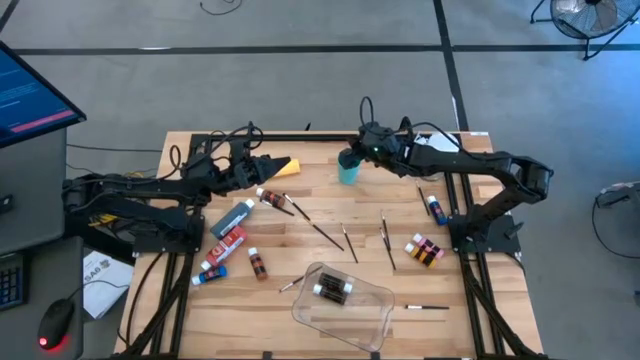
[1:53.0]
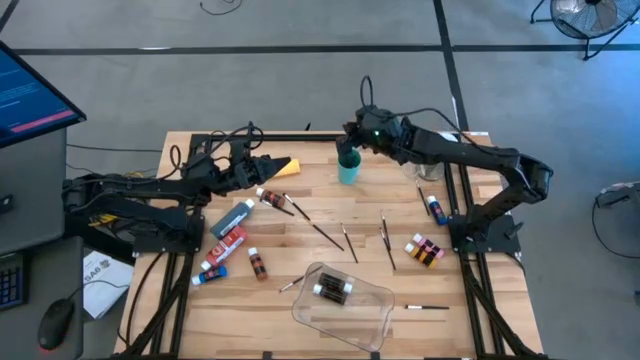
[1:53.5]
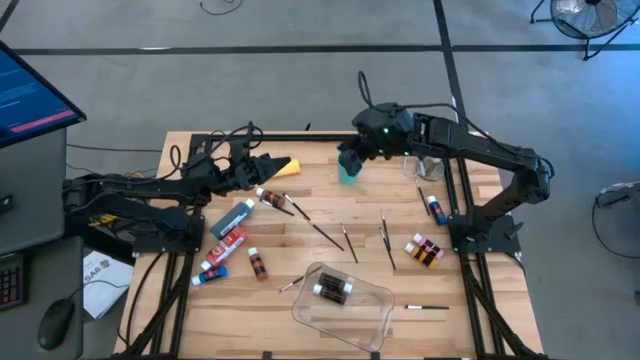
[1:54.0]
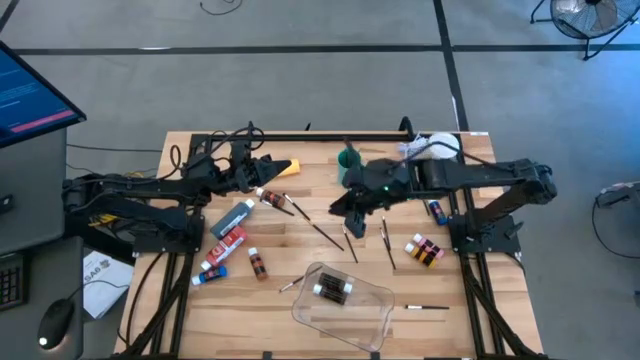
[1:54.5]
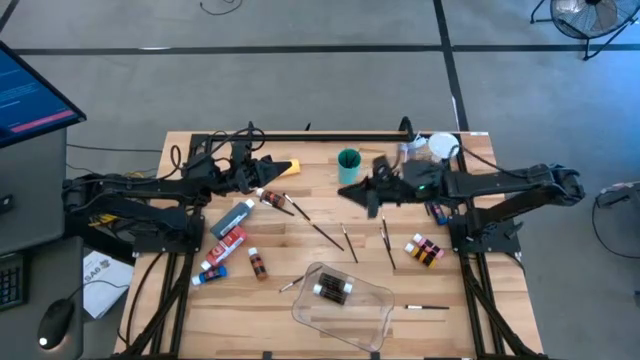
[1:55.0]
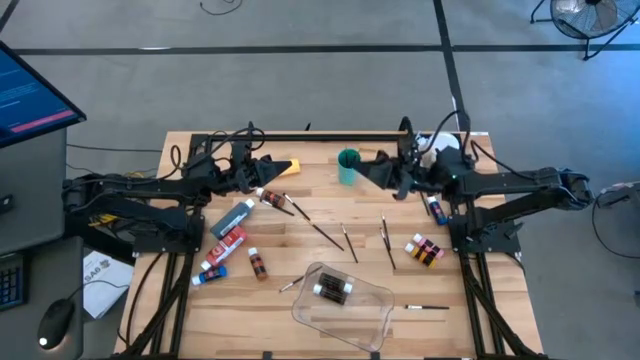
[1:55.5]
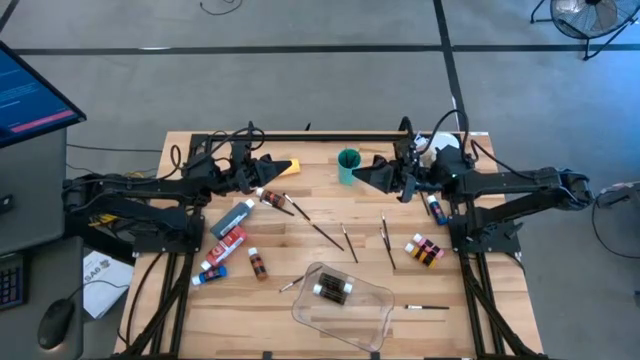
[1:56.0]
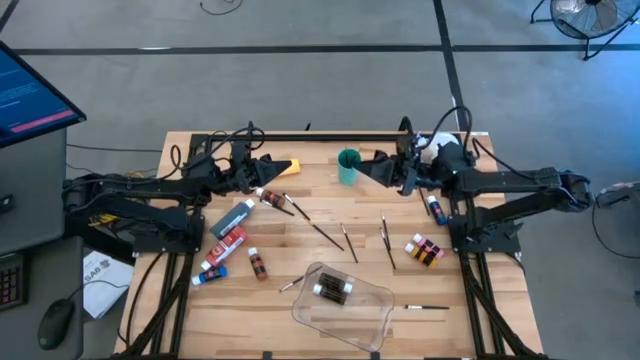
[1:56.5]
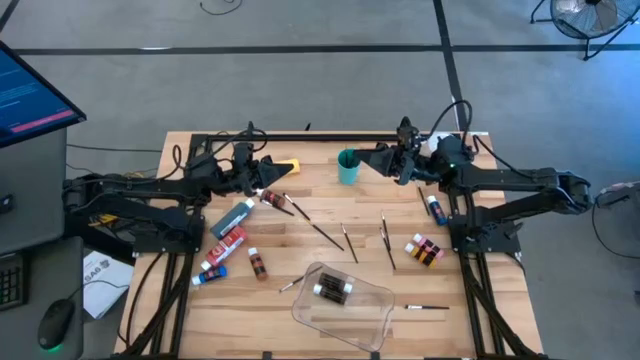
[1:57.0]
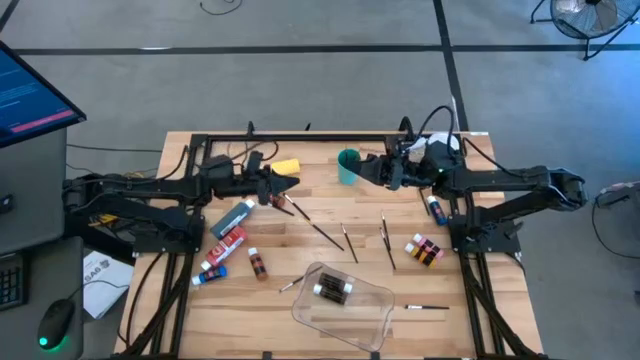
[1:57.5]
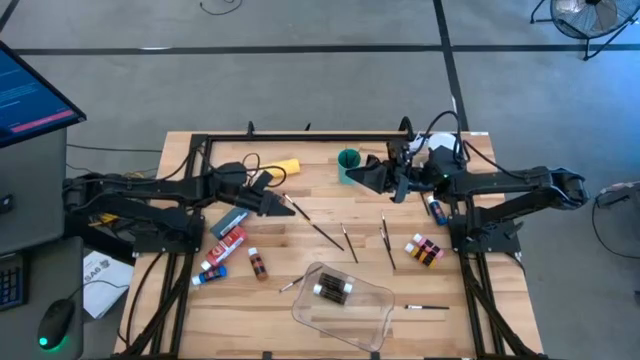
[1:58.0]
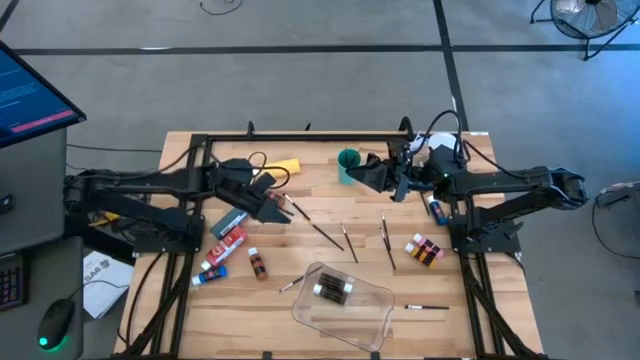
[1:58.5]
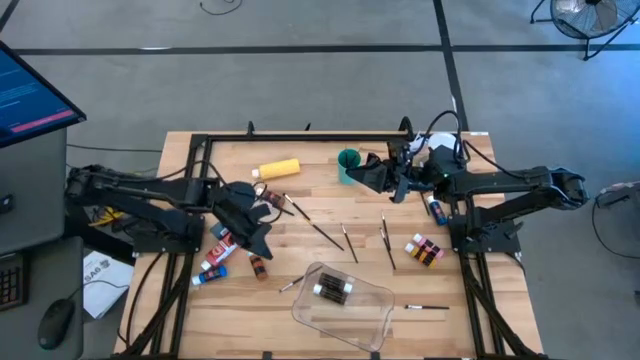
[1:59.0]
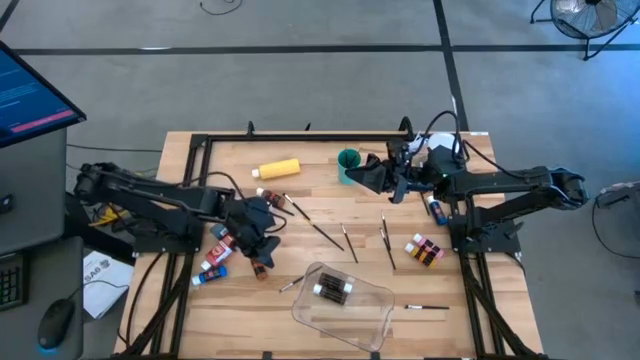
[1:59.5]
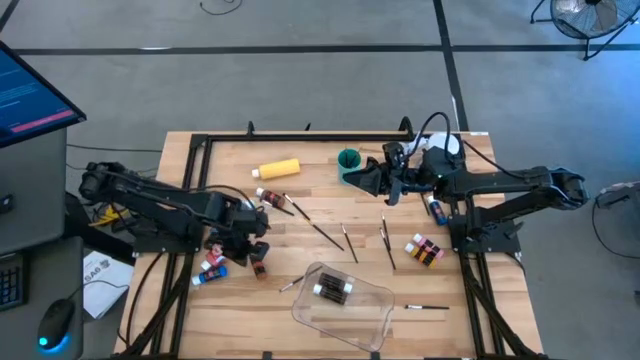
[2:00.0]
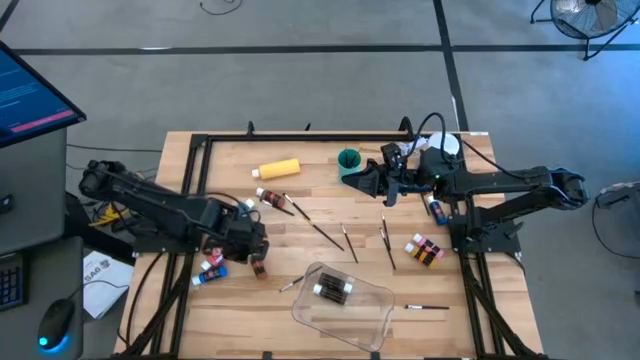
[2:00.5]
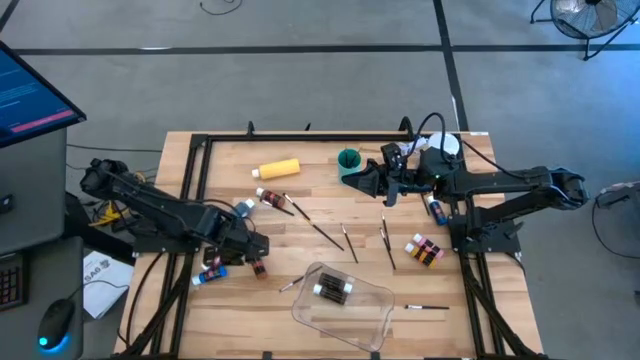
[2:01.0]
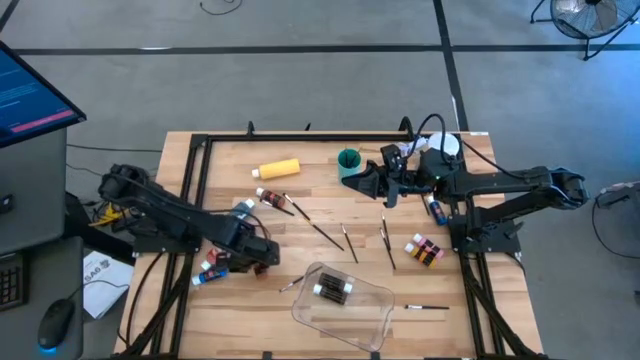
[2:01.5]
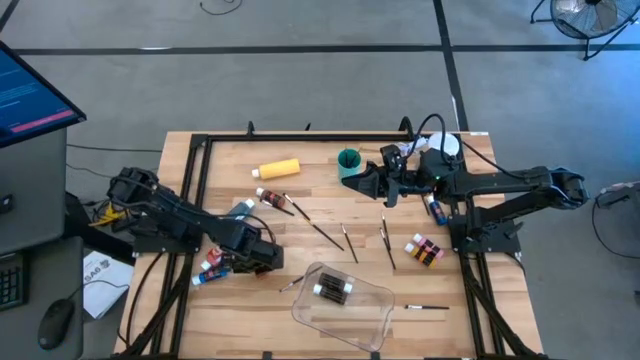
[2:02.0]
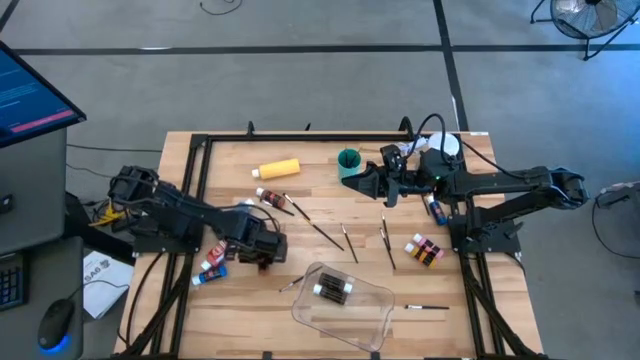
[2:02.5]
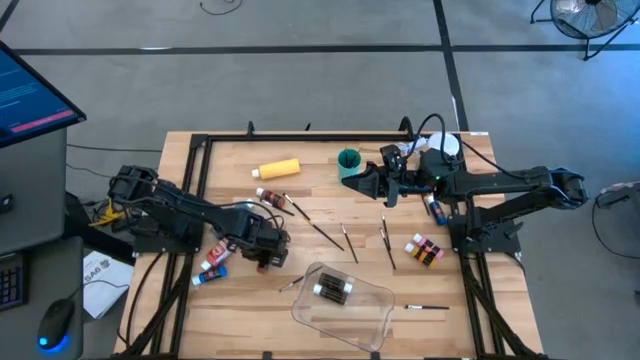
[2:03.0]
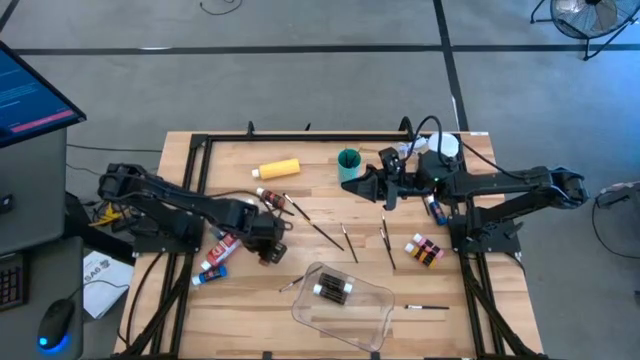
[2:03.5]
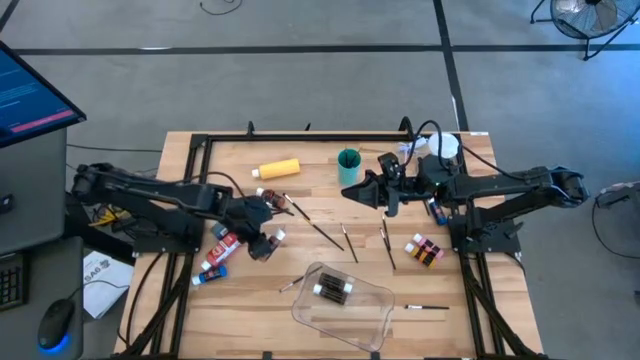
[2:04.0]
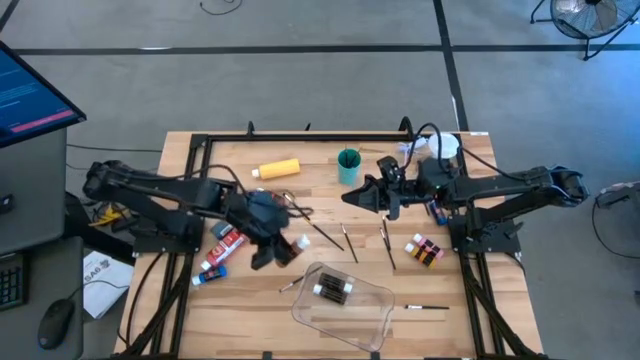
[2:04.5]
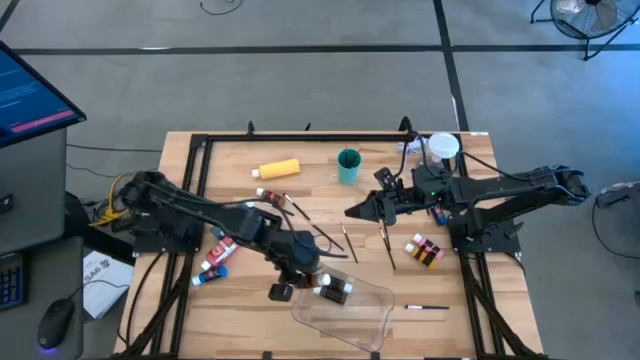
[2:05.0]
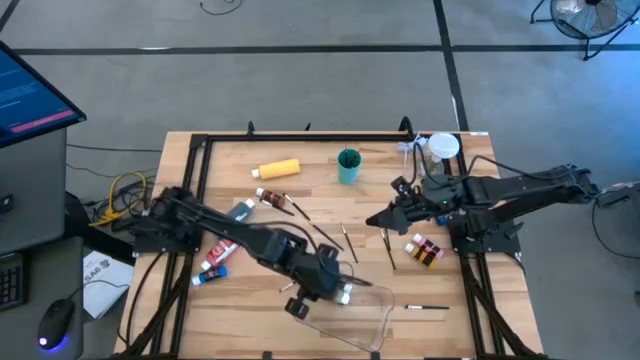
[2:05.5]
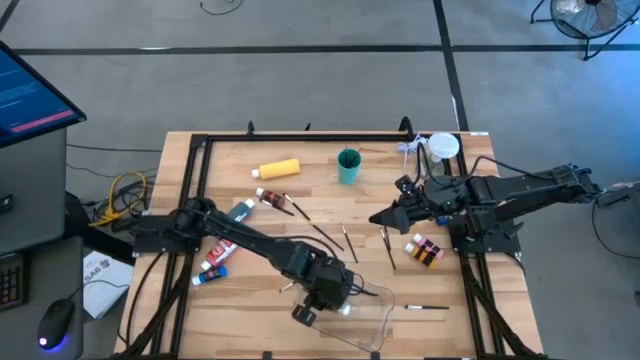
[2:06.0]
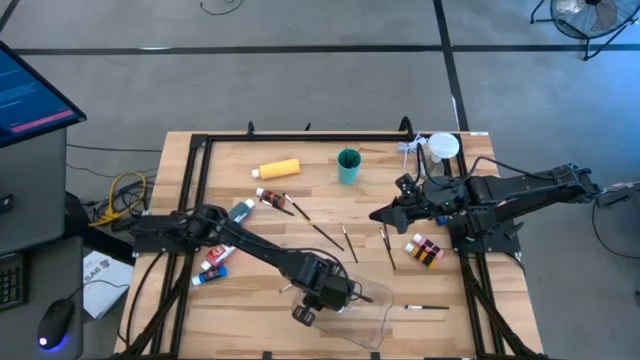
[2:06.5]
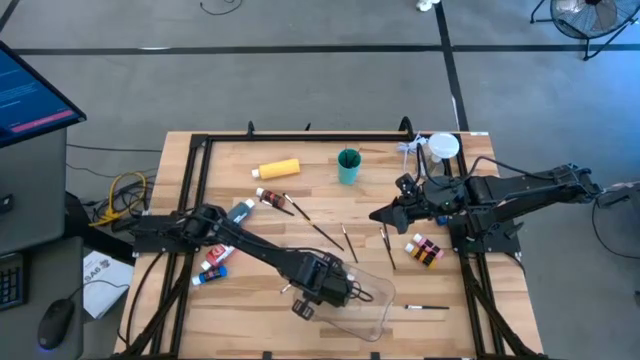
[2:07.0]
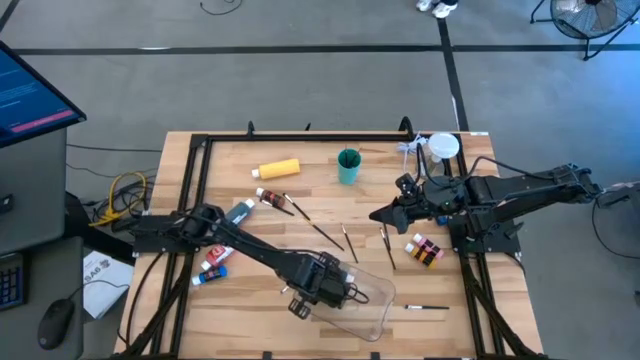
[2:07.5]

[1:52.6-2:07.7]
Task: Pick & Place Paint Supplies
Put the brown paint bottle into the transparent bin

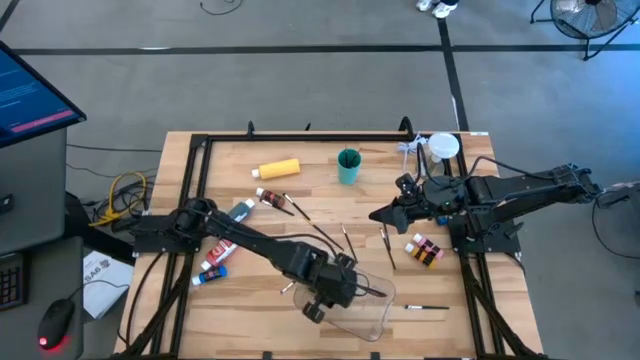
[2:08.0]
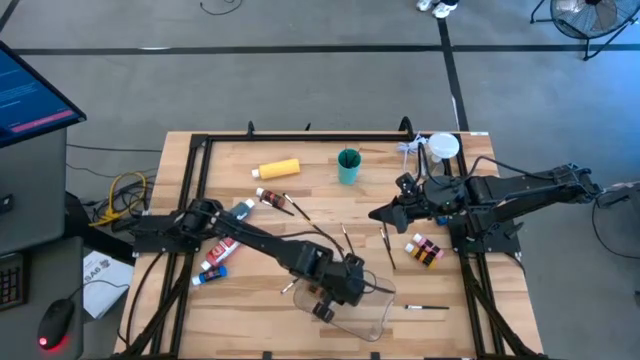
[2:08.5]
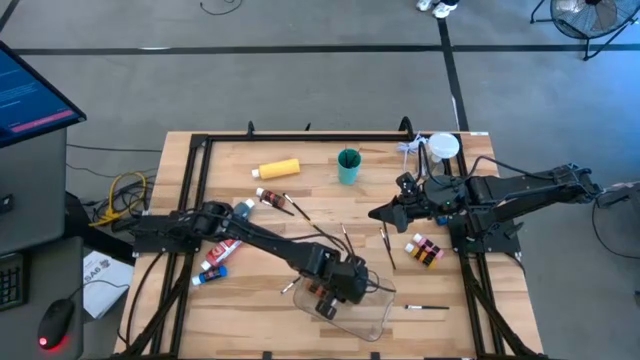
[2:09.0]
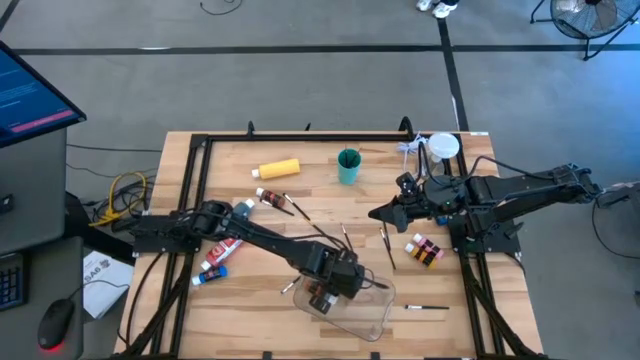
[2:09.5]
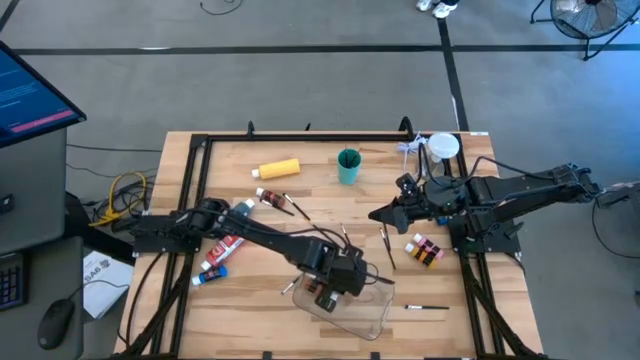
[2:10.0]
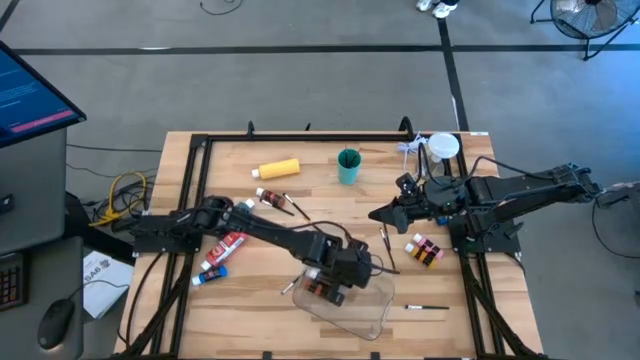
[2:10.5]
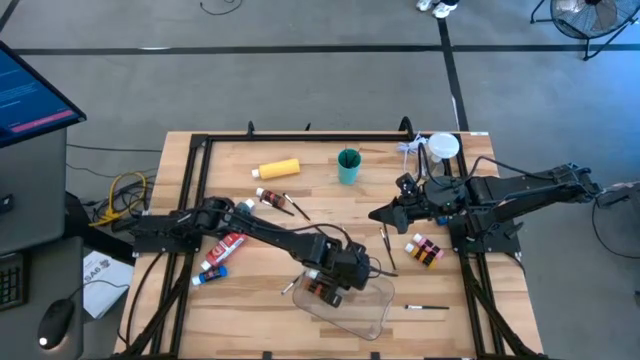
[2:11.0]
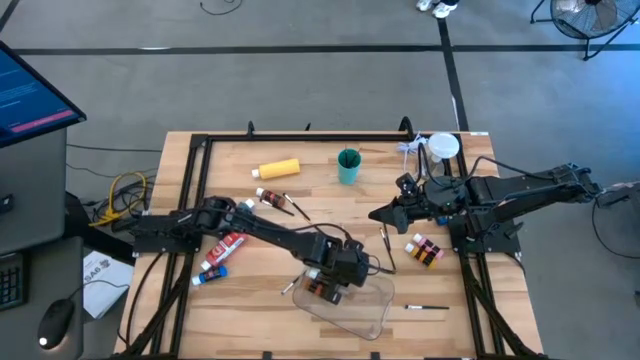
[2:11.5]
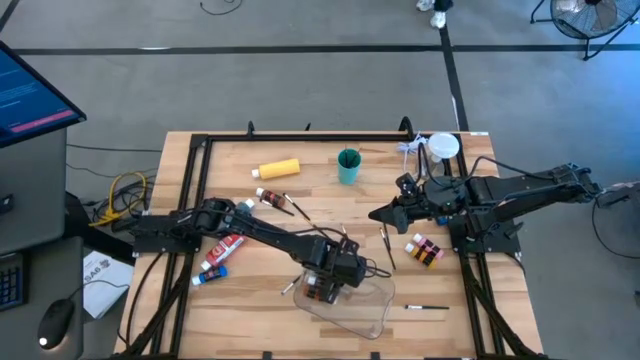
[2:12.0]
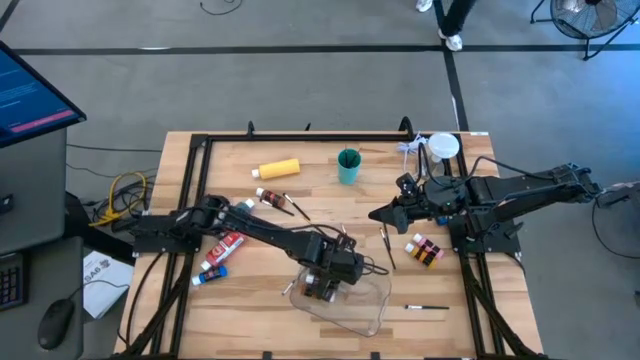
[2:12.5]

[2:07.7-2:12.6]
Adjust the paint bottles in the transparent bin

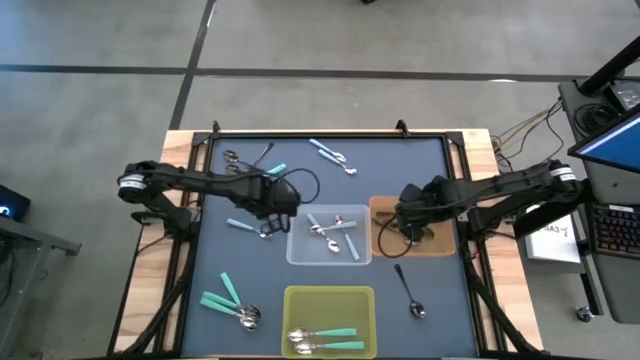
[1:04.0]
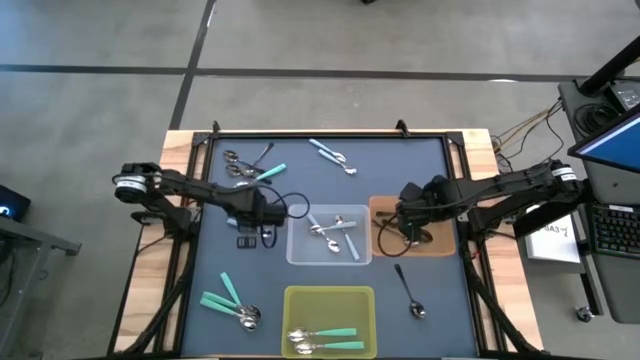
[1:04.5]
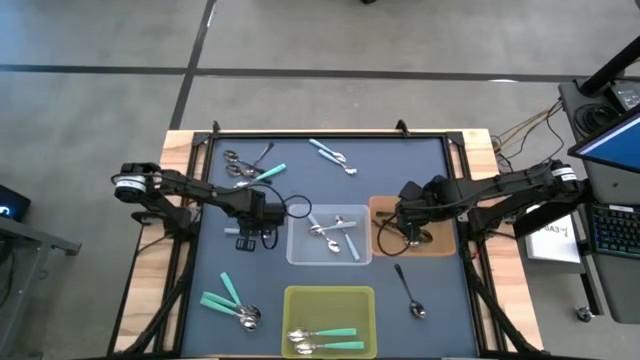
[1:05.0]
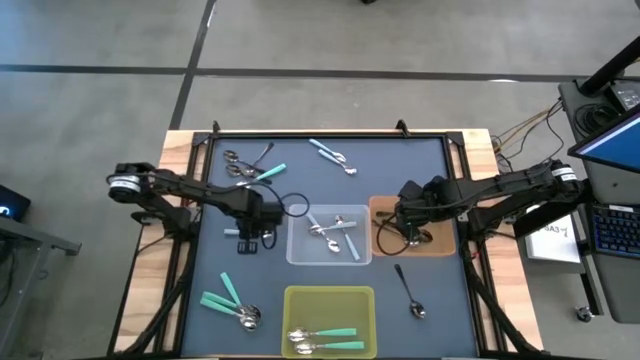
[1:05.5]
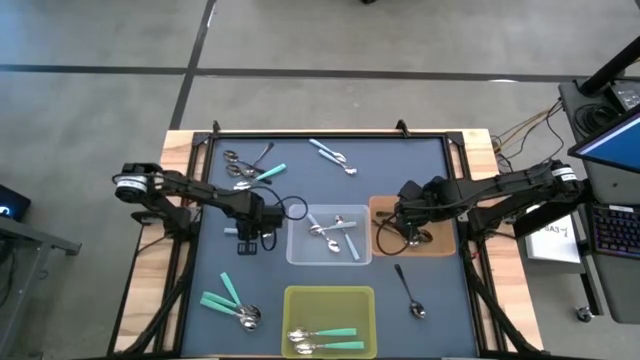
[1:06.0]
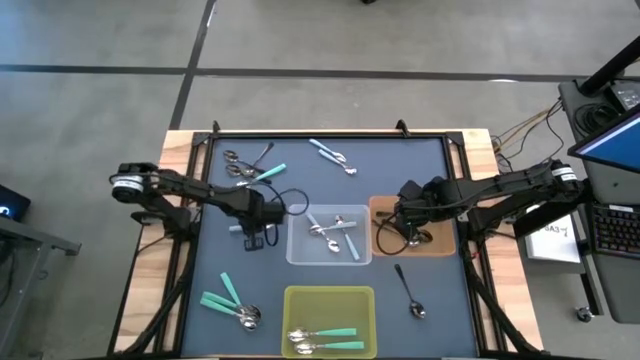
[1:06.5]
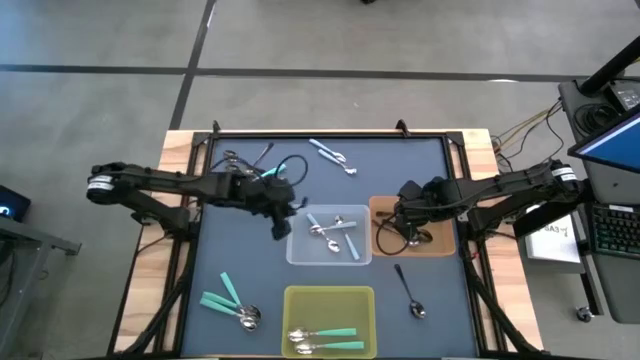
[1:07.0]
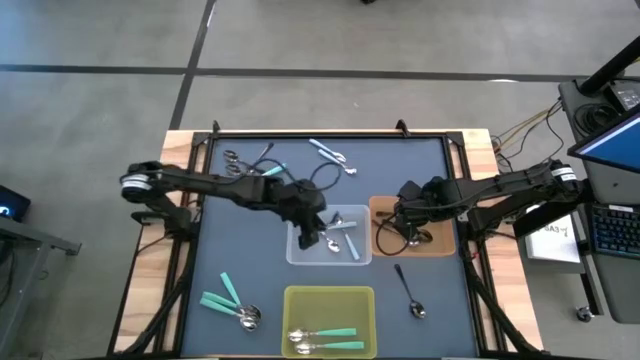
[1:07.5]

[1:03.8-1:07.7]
Task: Sort silverware by color (type)
Put the light blue spoon into the transparent bin
